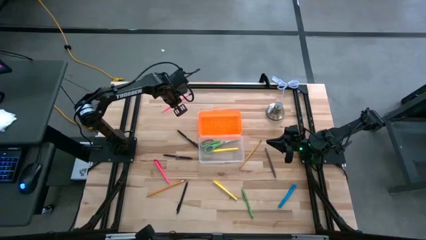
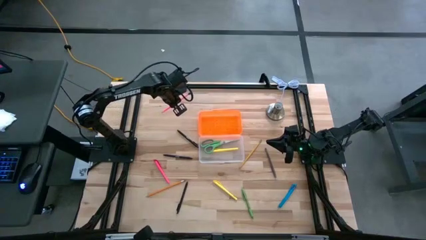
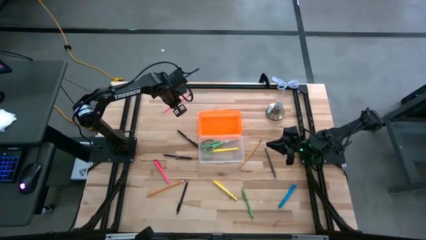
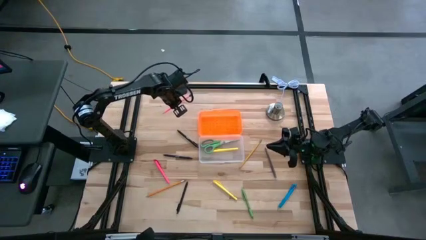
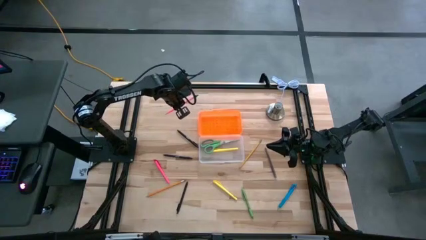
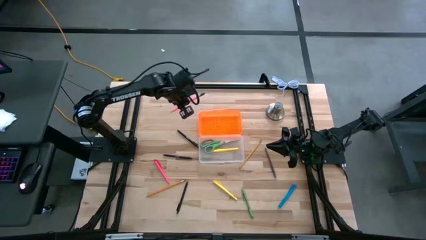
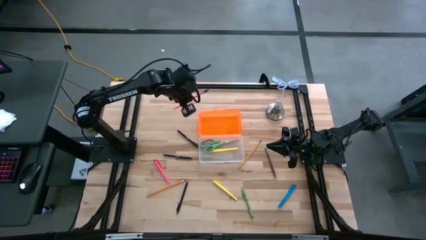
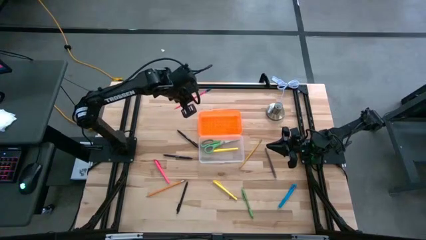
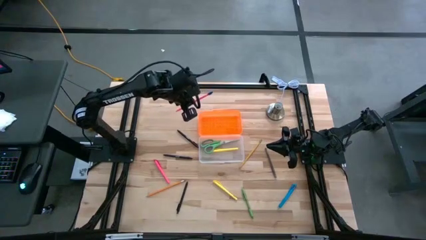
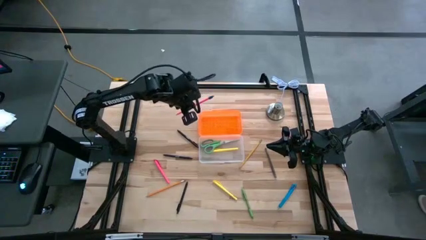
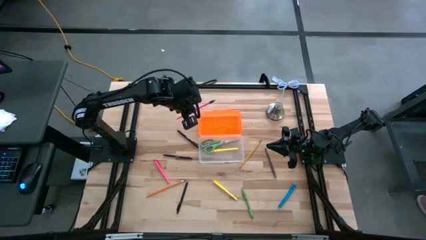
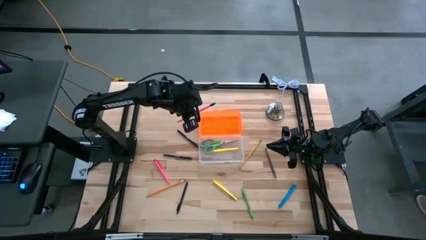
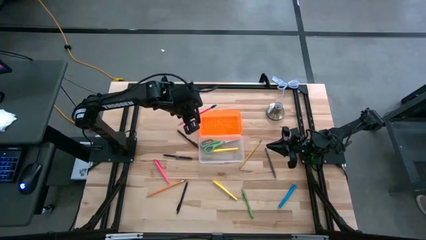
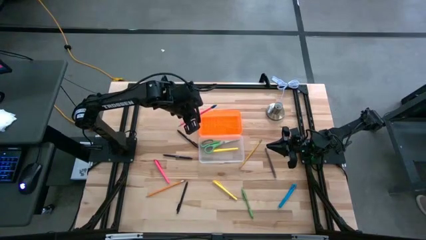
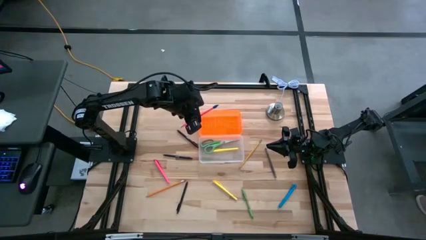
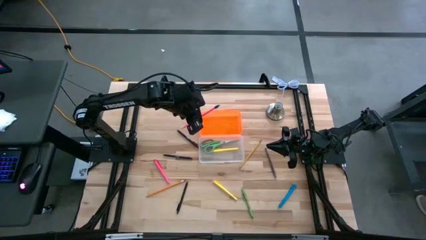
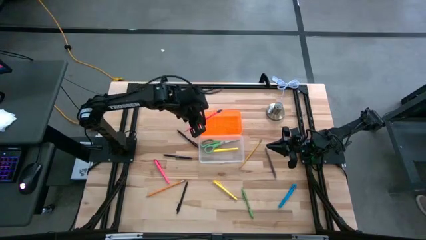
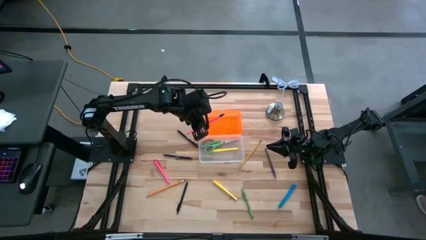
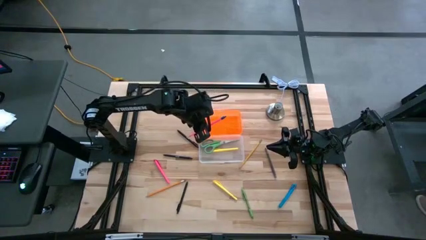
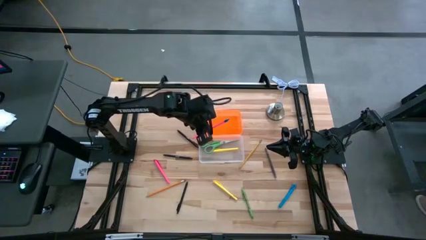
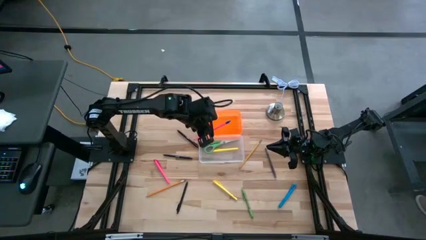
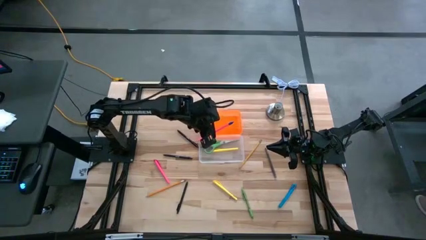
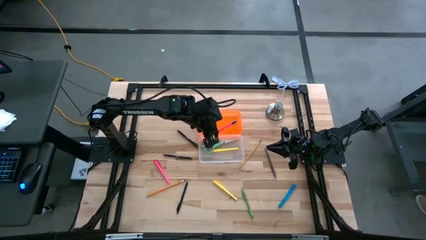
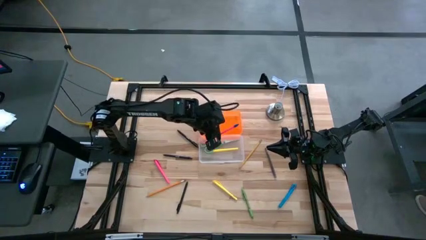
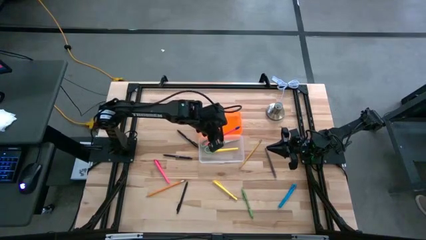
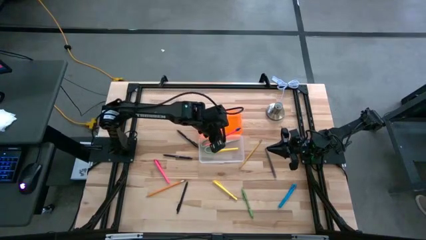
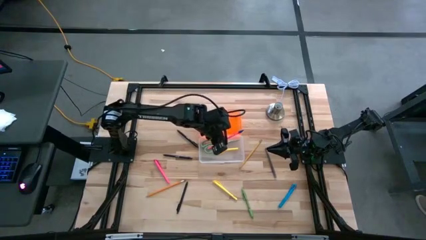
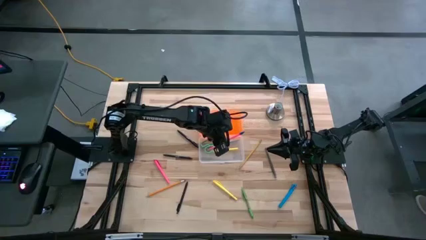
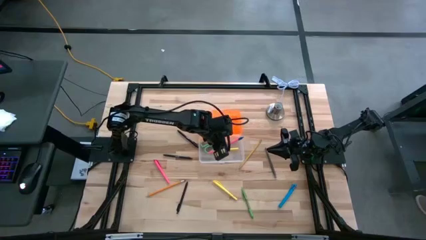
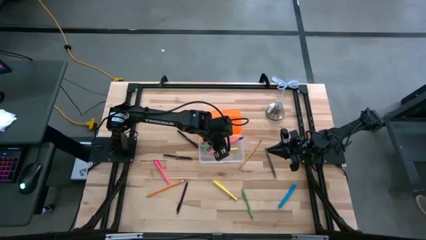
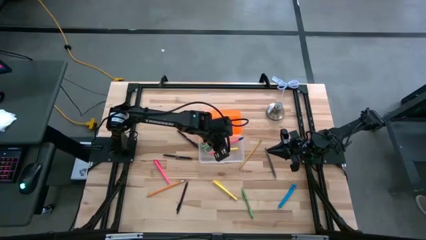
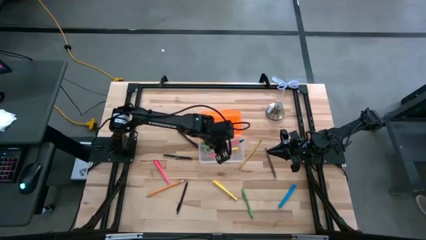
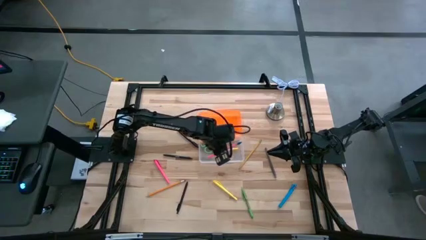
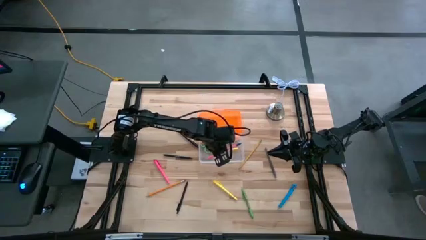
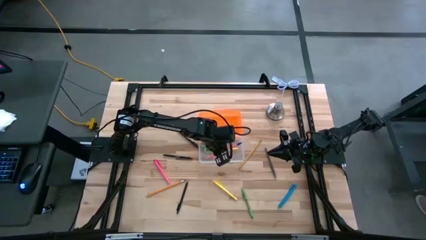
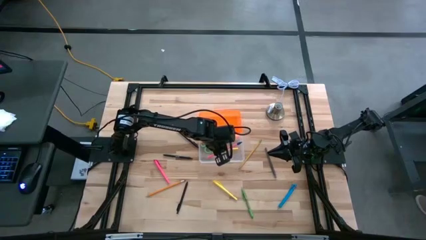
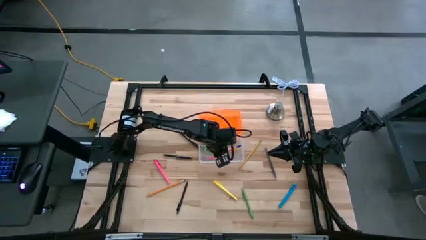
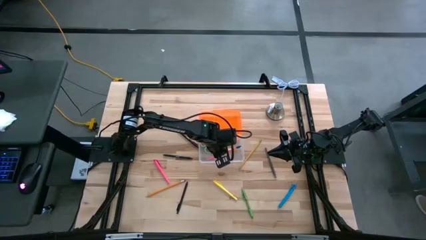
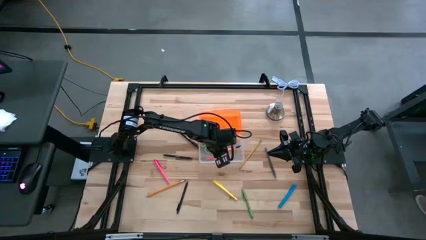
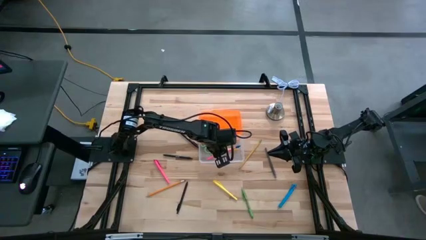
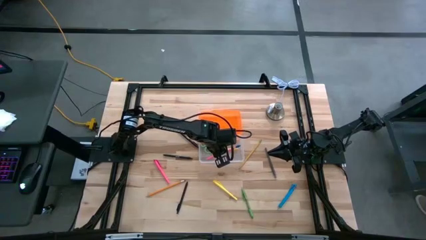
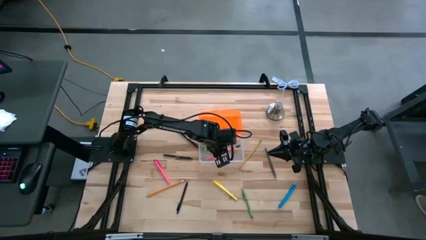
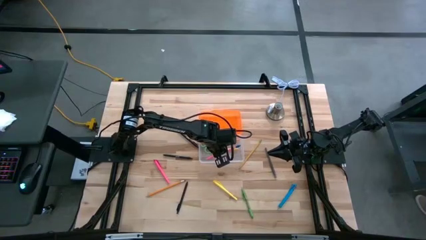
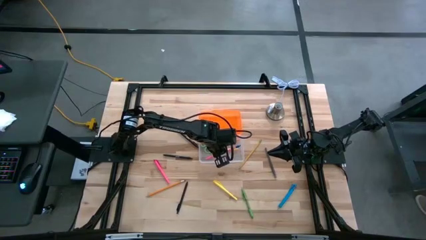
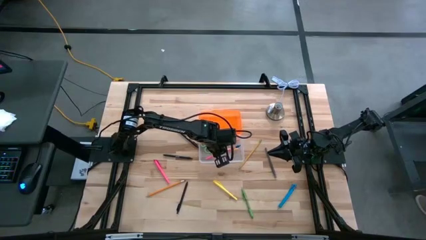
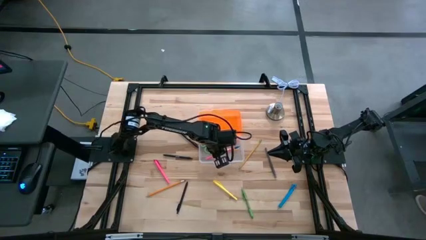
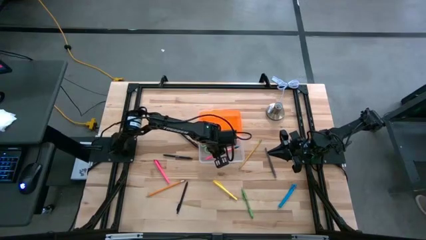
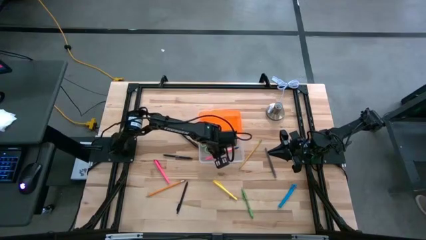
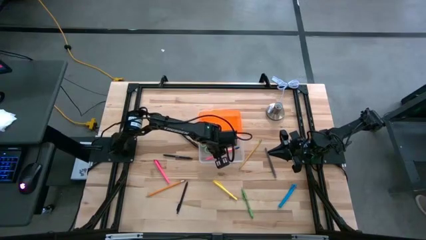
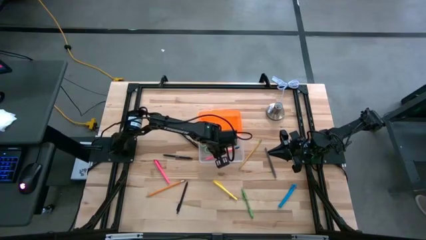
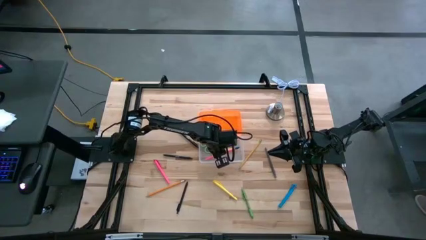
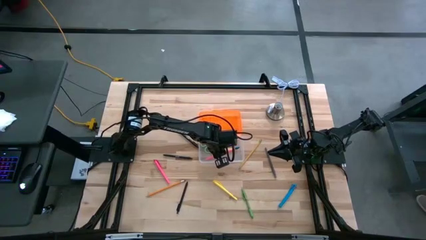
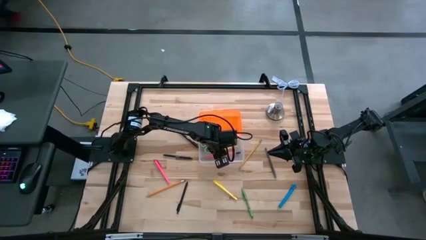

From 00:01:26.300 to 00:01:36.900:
Task: Pick & place school supplies into a supply box
Put the pink pen into the container

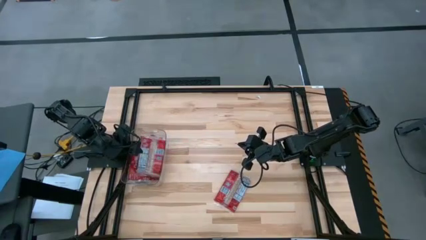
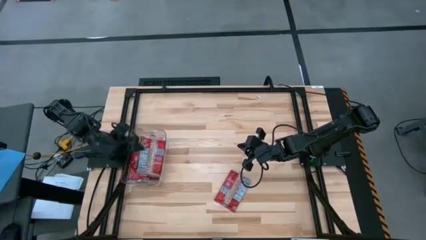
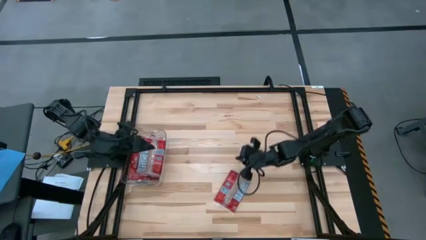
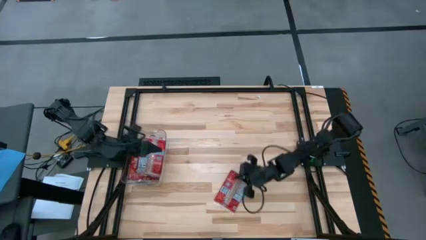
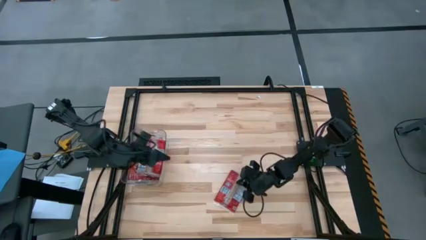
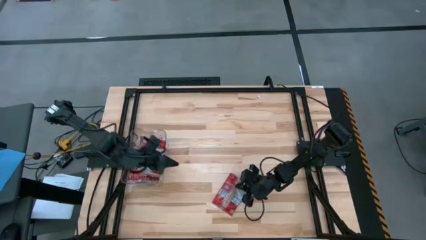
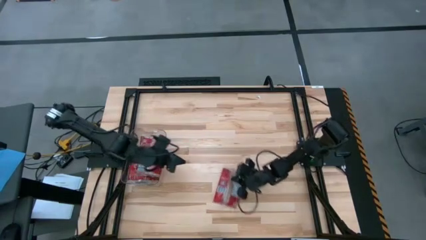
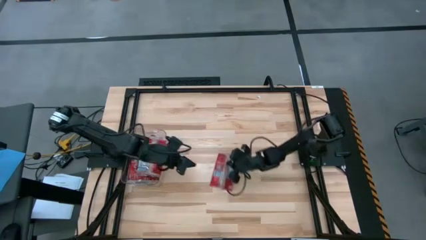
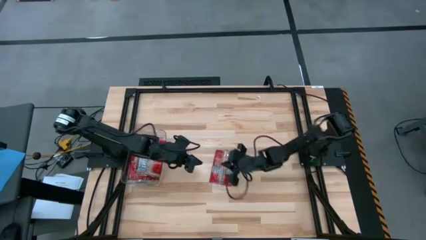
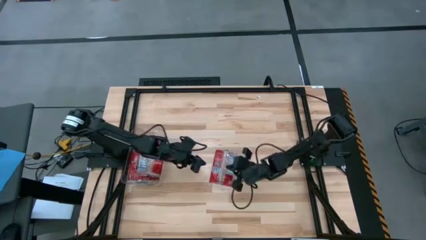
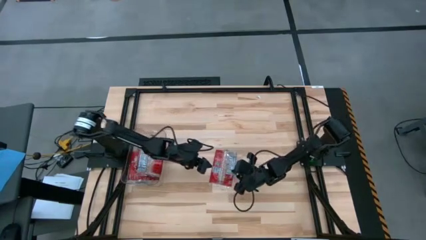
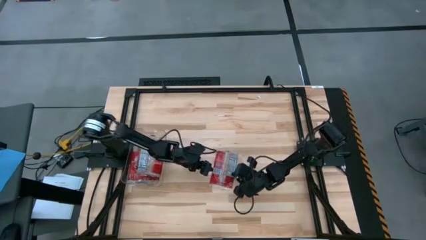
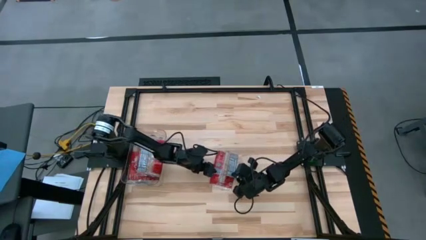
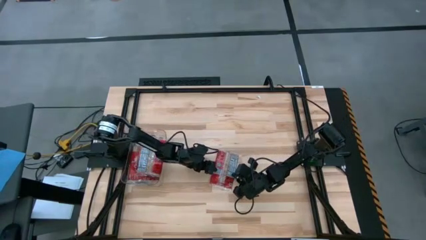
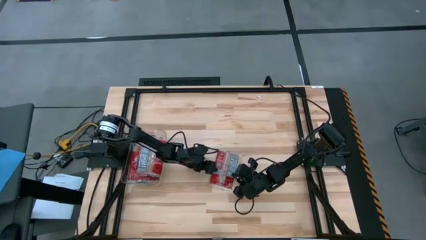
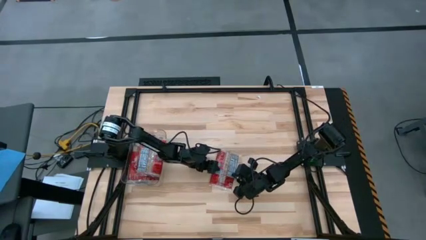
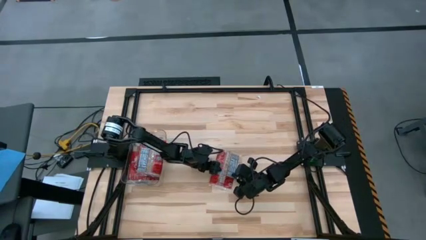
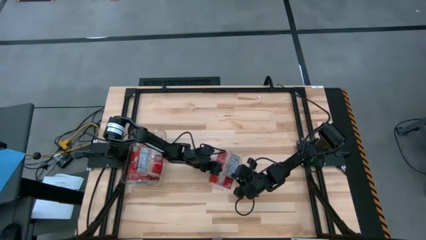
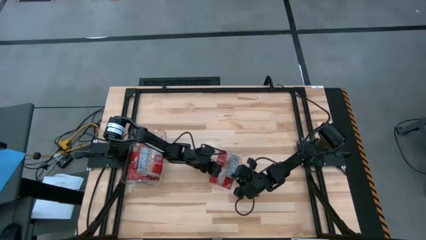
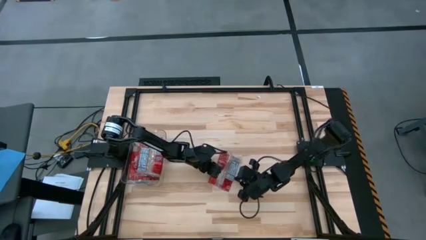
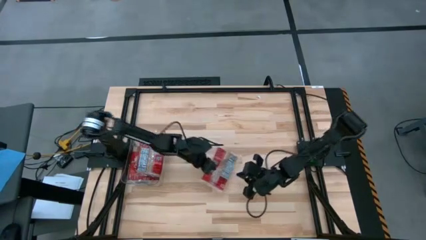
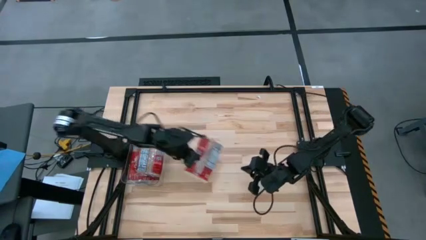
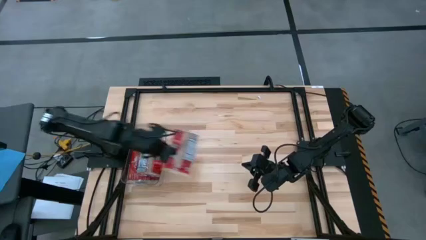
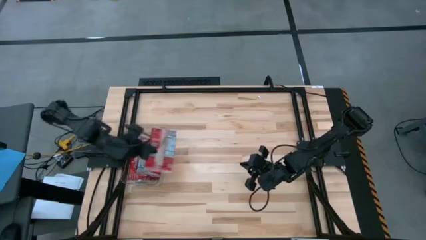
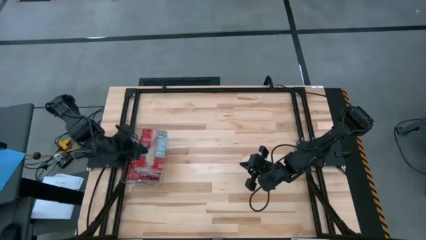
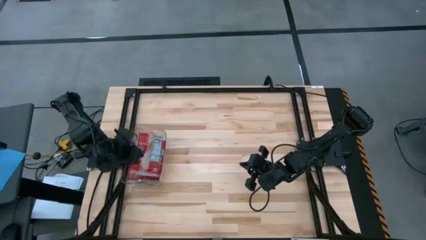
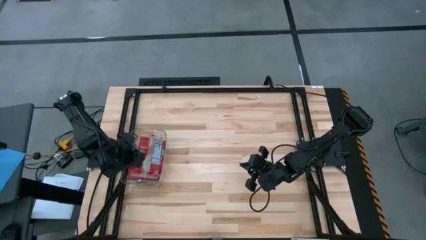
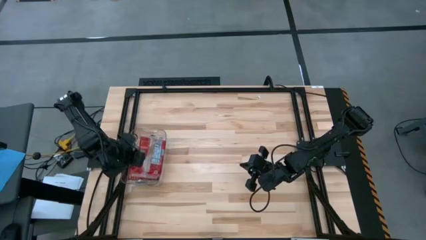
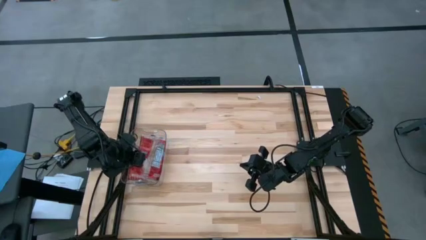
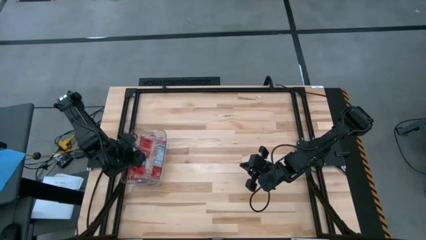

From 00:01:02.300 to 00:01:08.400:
Task: Sort popcorn bags into baskets
Put the red popcorn bag into the transparent bin
